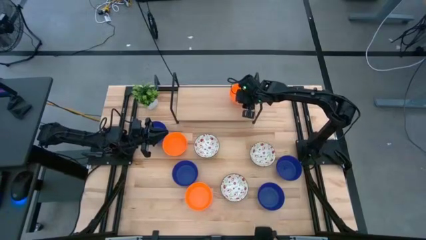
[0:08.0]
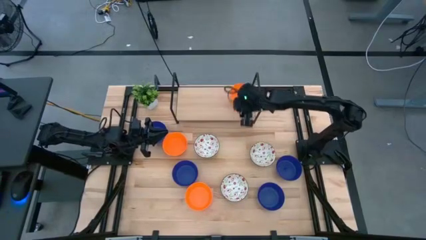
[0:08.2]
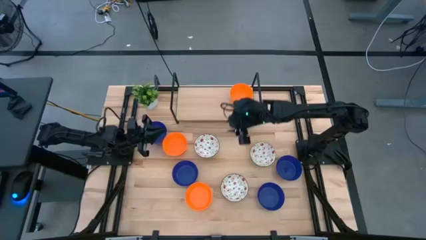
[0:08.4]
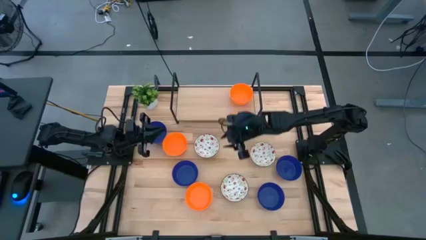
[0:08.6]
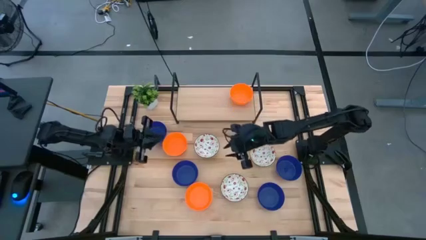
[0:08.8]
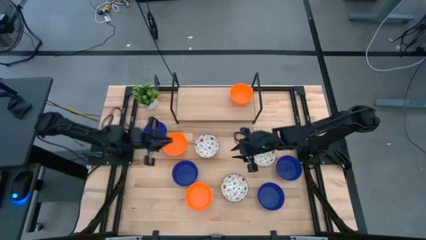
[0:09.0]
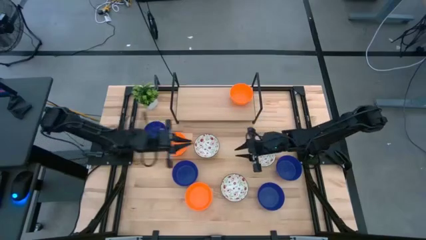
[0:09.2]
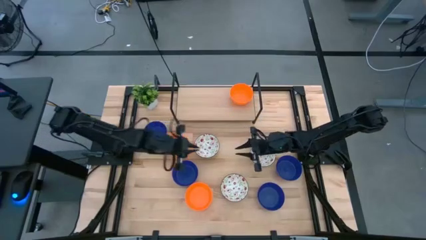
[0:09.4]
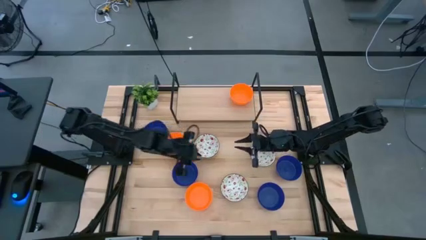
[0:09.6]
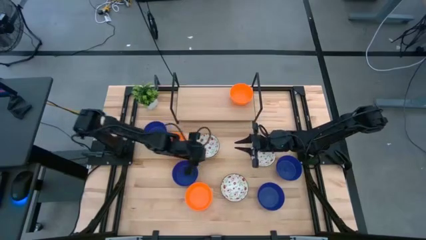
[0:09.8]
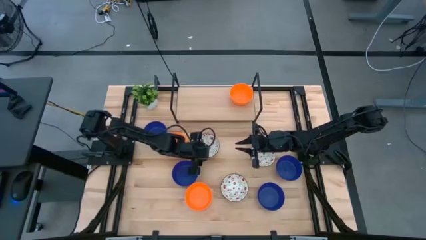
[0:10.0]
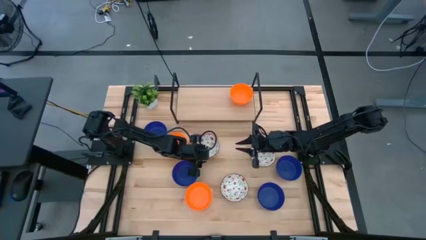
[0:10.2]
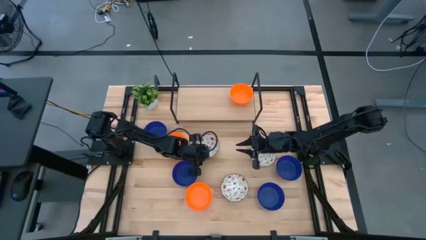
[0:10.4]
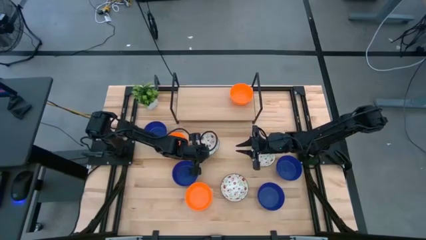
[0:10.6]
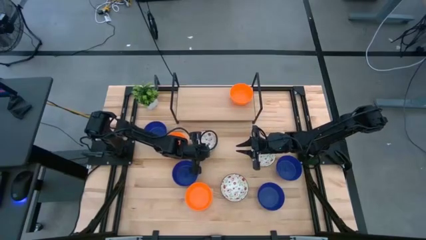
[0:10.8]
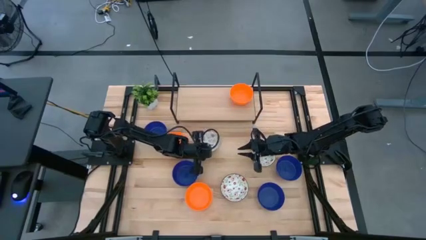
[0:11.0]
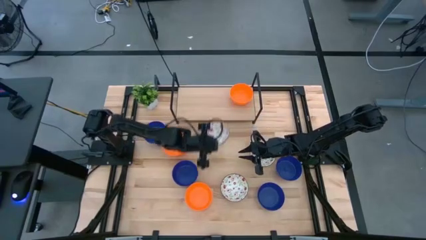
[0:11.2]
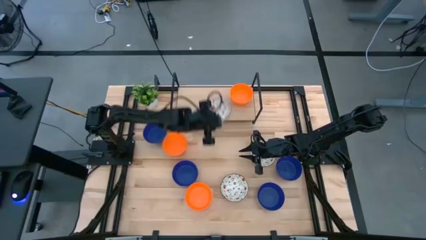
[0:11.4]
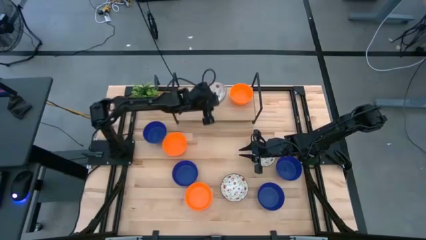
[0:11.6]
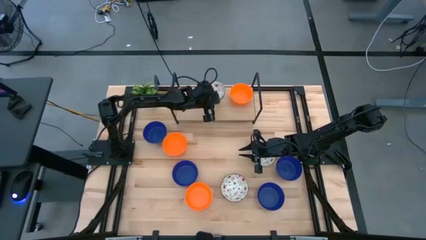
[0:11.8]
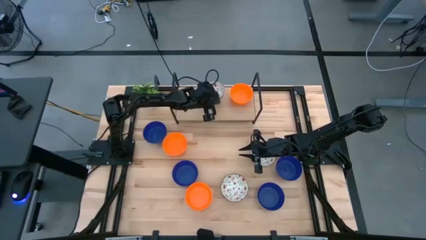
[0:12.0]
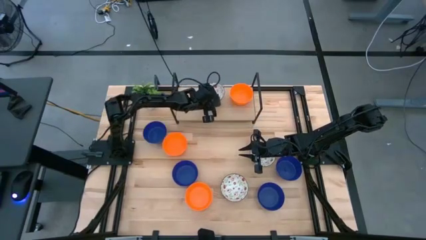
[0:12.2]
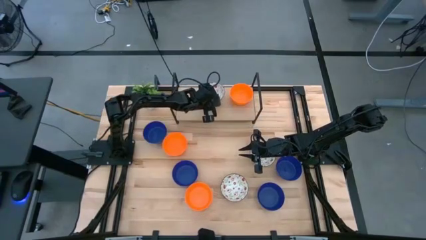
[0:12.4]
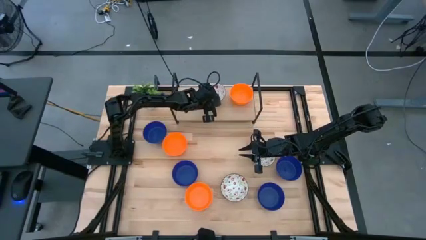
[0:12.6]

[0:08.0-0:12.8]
Task: Pick & Place Mini bowls
Put the white bowl on the shelf

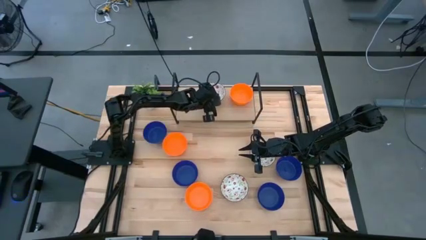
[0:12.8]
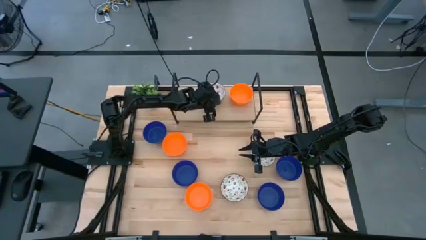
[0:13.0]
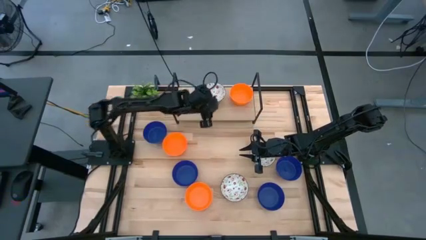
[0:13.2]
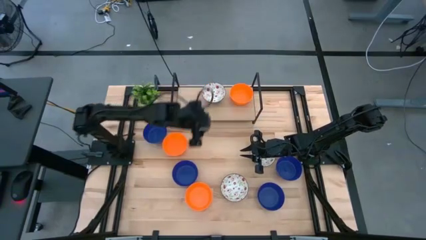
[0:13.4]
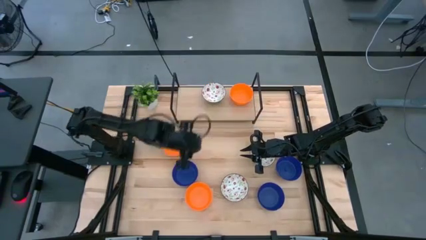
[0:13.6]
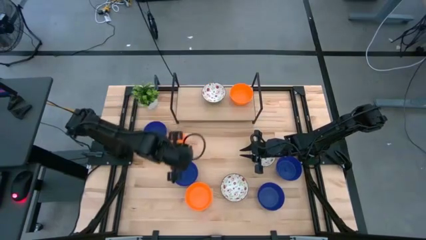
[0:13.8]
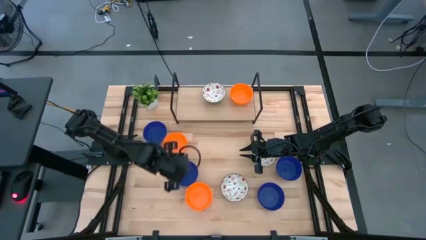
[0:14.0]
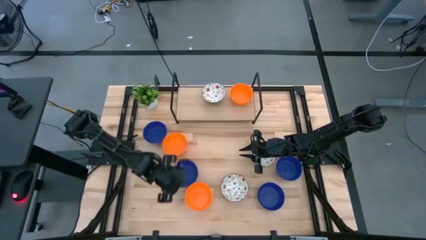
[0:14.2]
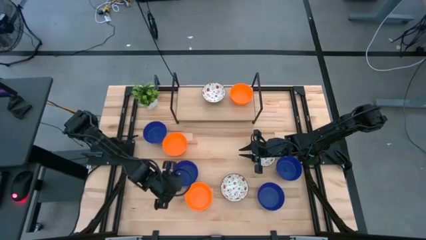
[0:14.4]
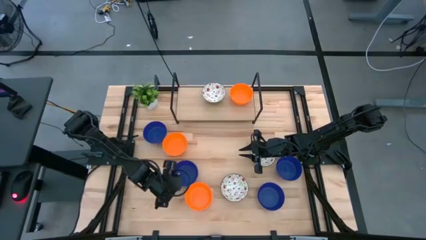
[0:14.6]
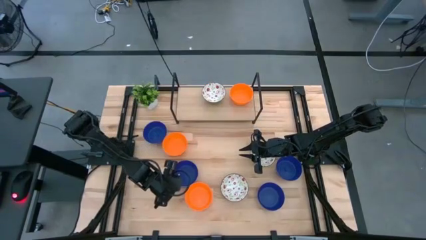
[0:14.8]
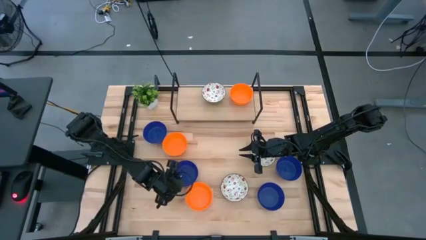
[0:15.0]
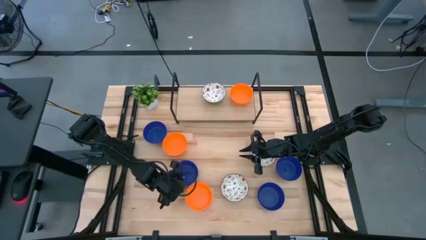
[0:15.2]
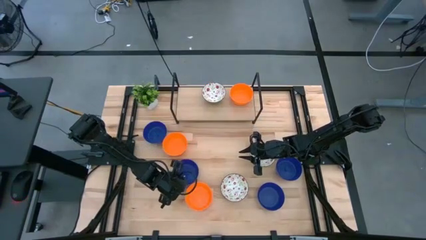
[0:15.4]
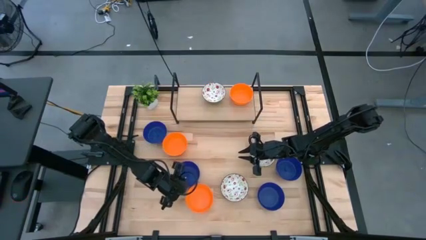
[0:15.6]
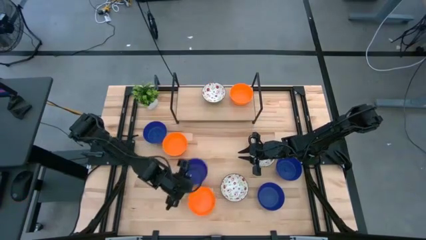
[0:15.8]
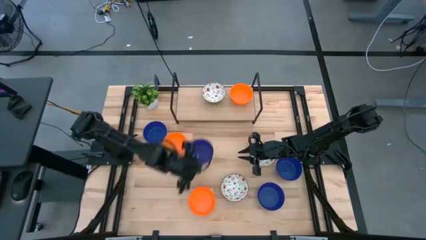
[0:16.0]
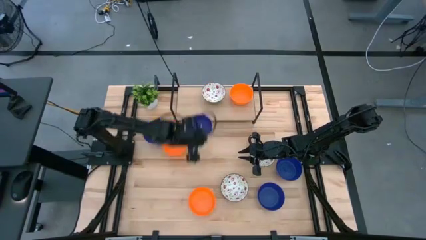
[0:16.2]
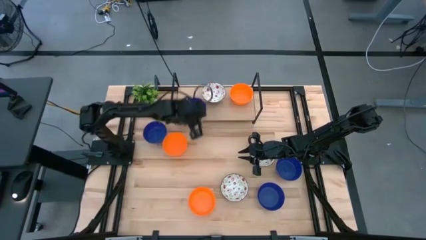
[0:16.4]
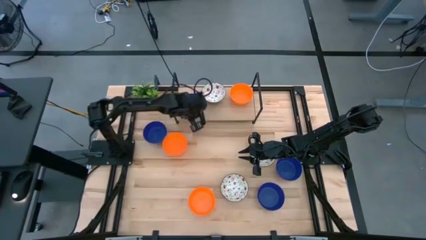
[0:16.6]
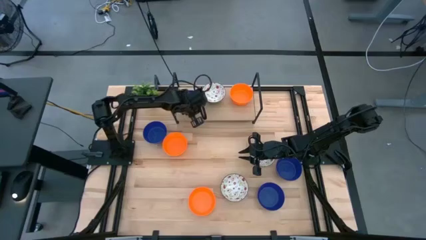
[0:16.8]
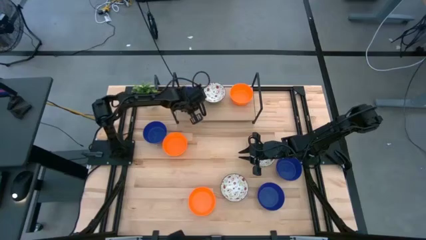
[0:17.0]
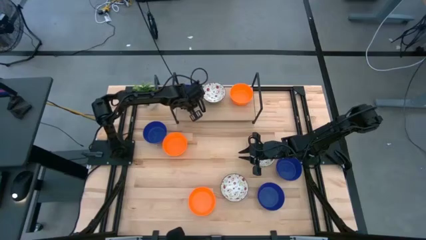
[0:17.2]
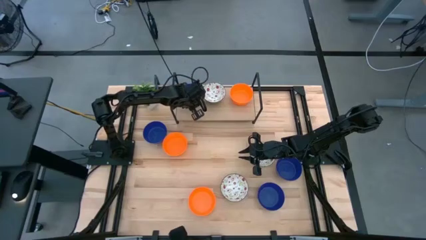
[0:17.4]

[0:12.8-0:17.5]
Put the blue bowl on the shelf

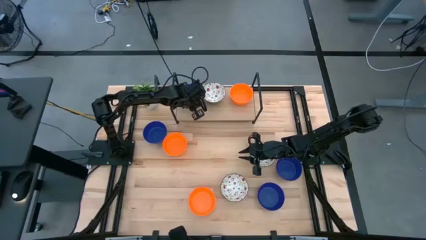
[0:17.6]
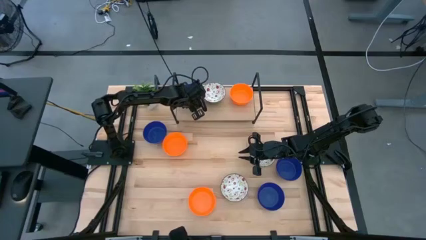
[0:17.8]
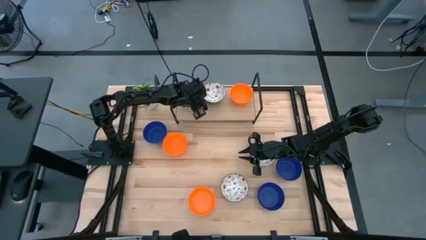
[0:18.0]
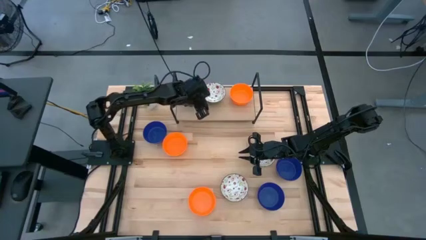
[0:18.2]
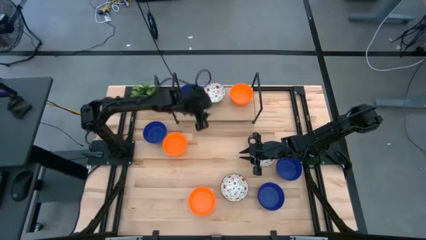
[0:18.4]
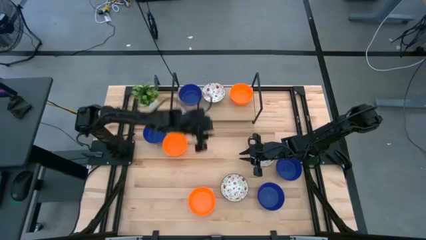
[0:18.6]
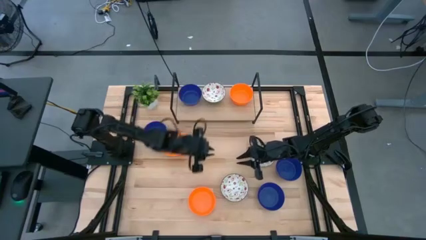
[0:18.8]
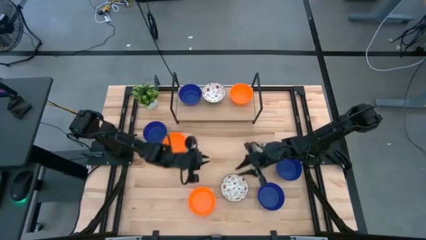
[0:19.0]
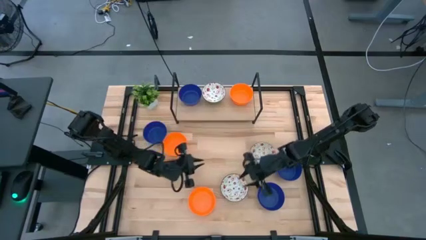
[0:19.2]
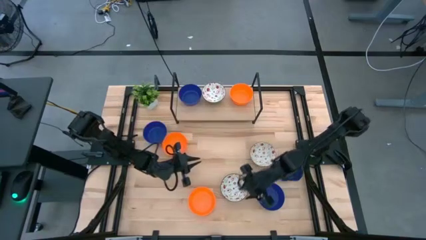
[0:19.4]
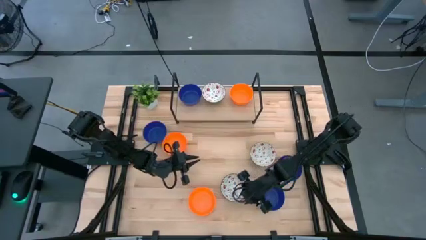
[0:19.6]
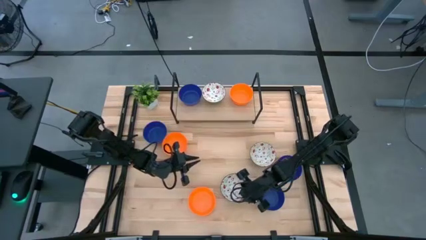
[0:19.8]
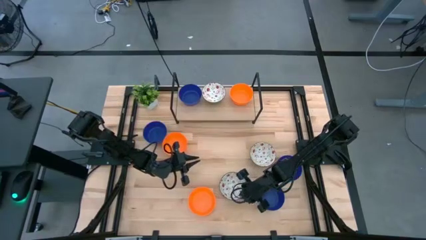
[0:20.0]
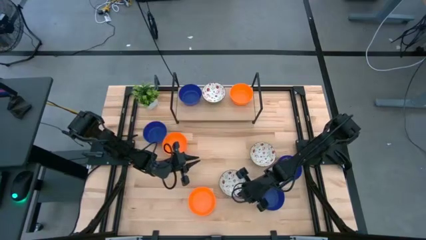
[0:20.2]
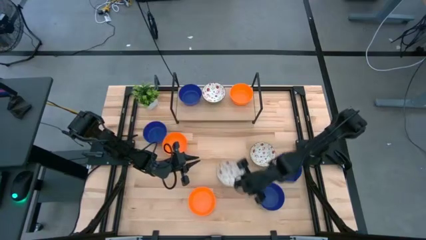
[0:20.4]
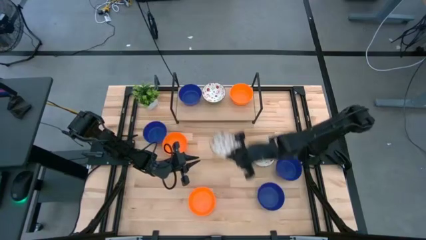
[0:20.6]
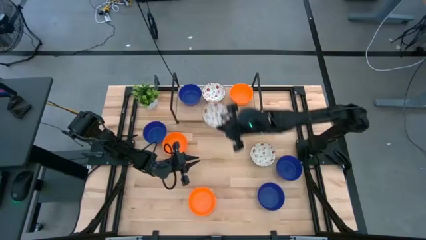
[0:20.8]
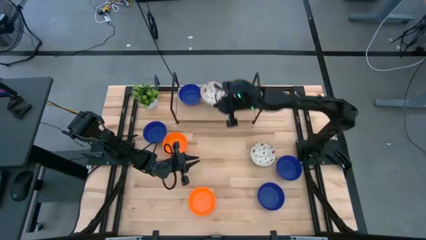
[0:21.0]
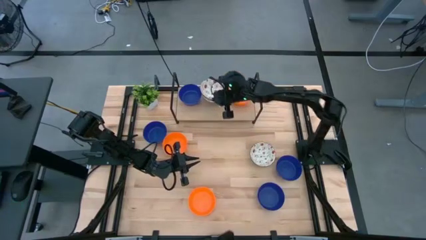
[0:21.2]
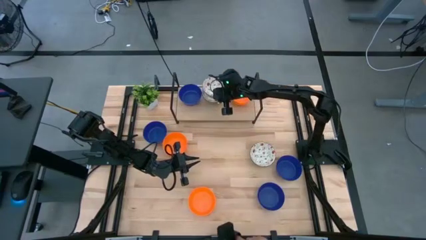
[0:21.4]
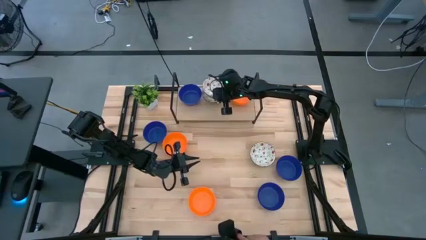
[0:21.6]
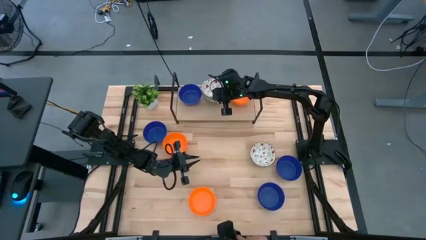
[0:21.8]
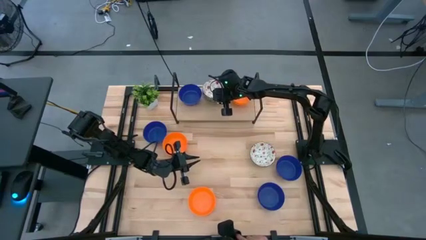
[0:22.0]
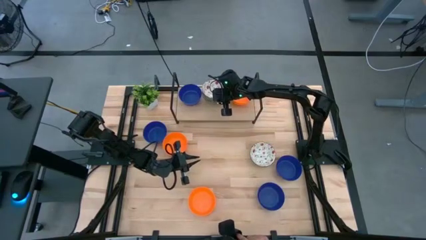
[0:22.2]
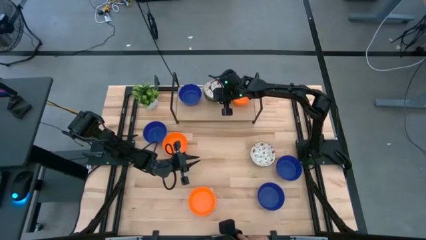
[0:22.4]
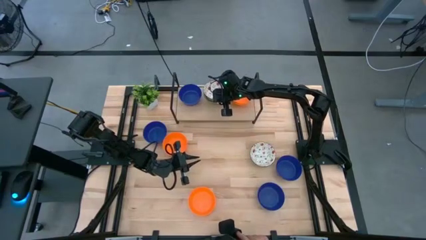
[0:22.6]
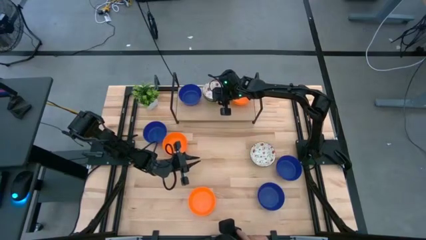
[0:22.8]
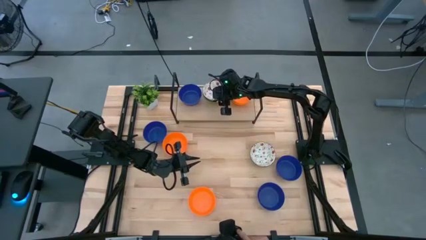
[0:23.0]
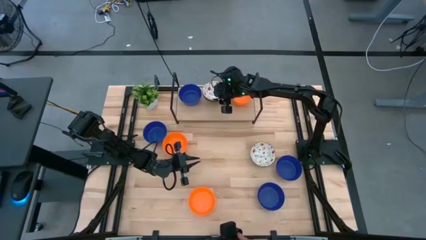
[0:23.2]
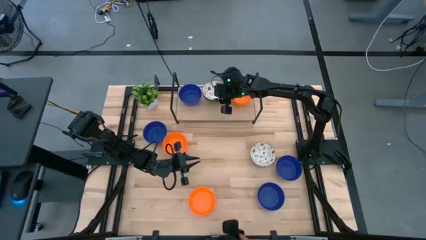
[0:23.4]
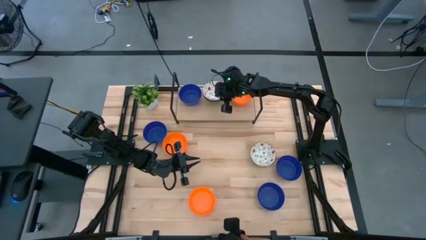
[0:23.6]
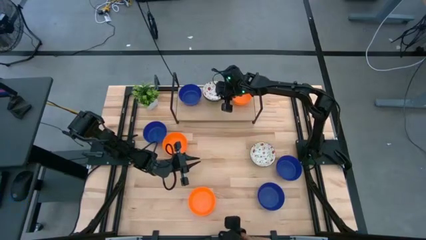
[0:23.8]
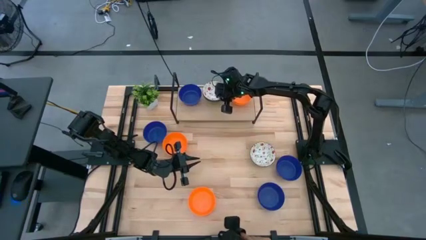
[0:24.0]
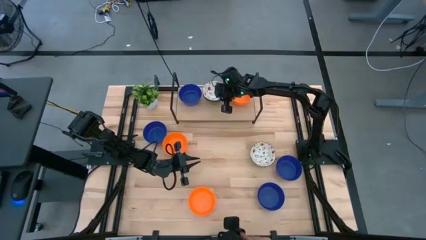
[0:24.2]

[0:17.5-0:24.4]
Stack the white bowl on top of the white bowl on the shelf
